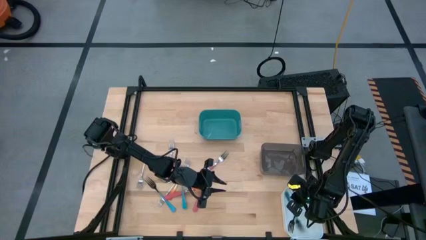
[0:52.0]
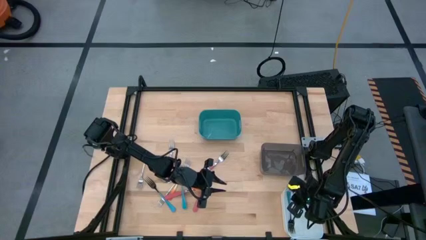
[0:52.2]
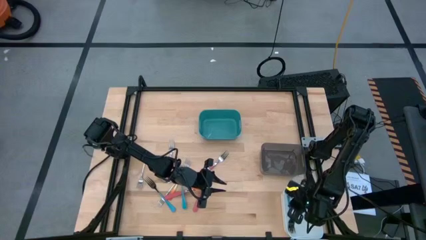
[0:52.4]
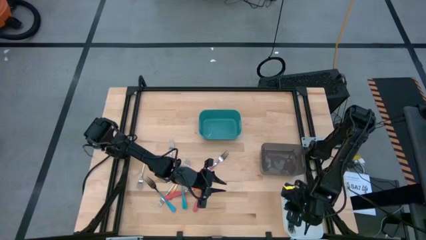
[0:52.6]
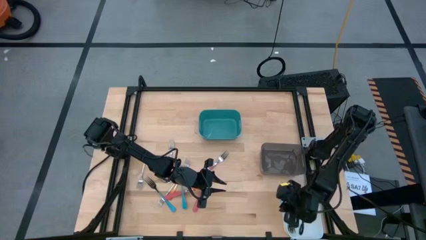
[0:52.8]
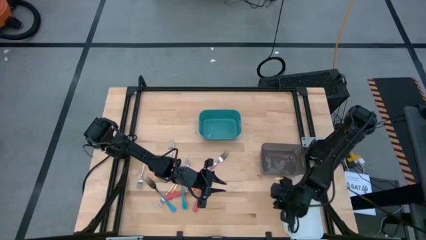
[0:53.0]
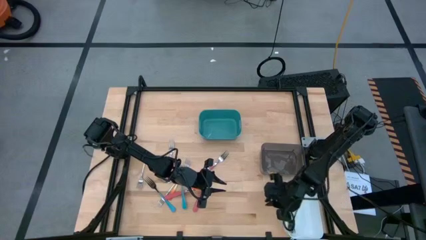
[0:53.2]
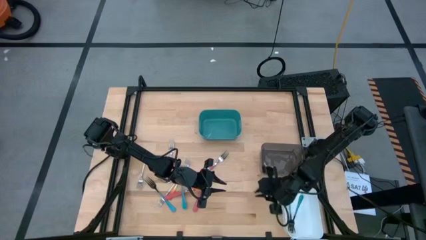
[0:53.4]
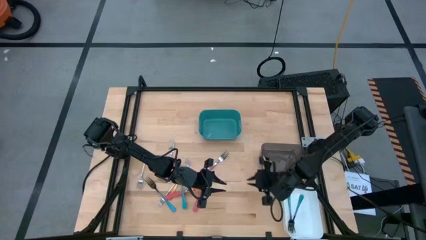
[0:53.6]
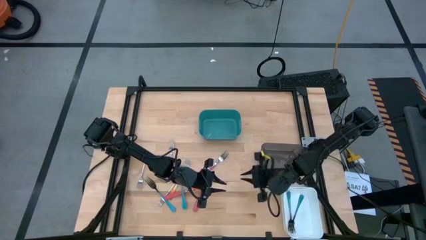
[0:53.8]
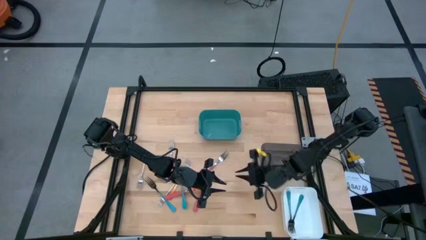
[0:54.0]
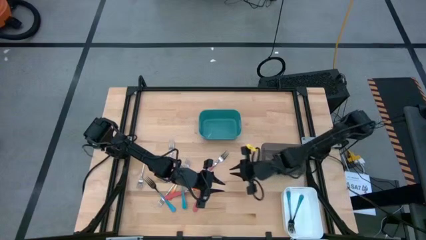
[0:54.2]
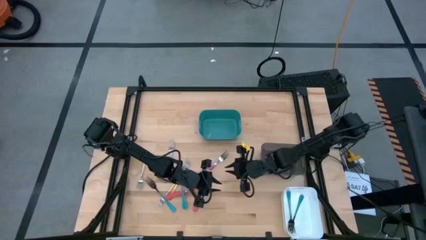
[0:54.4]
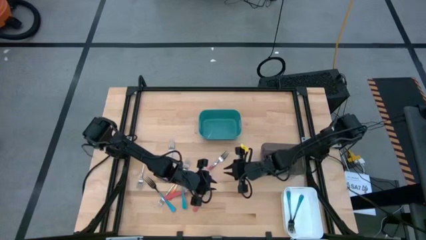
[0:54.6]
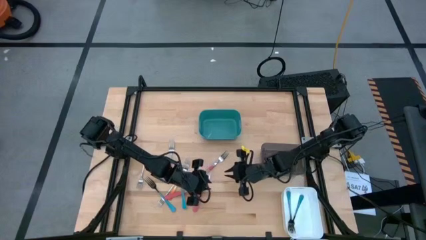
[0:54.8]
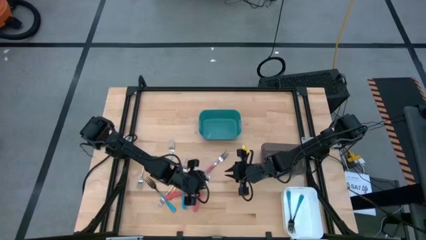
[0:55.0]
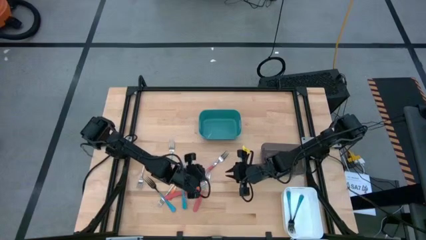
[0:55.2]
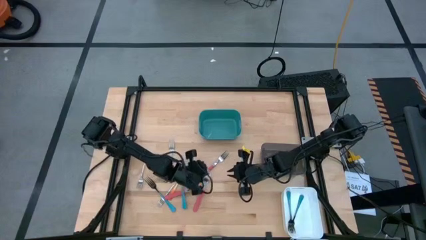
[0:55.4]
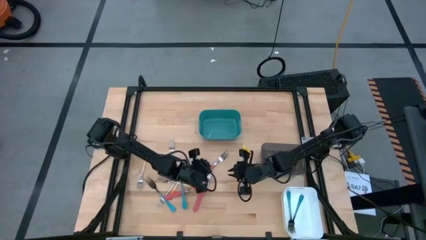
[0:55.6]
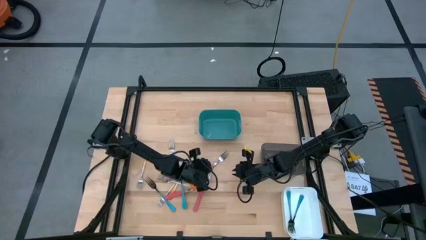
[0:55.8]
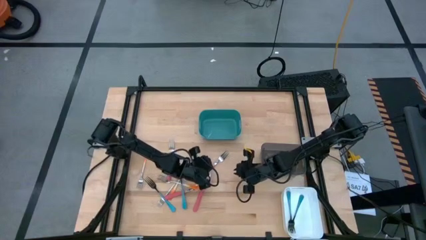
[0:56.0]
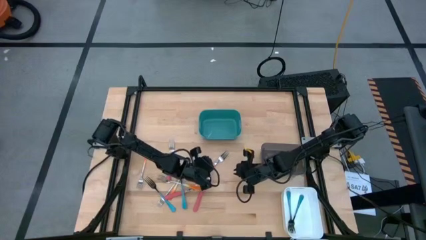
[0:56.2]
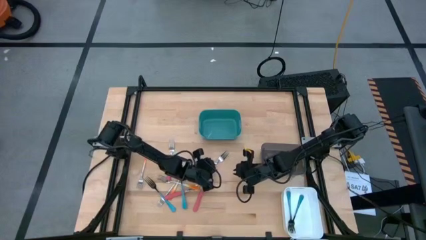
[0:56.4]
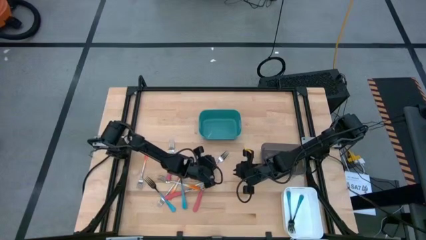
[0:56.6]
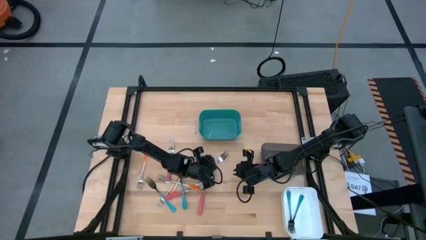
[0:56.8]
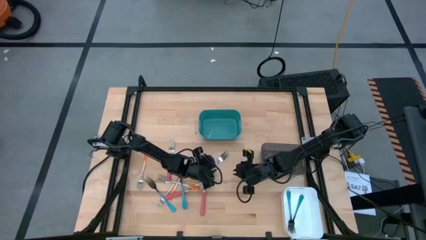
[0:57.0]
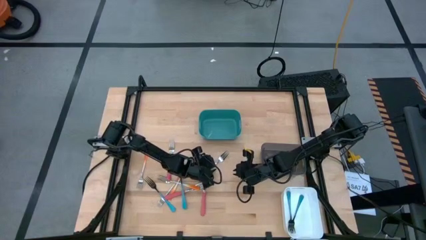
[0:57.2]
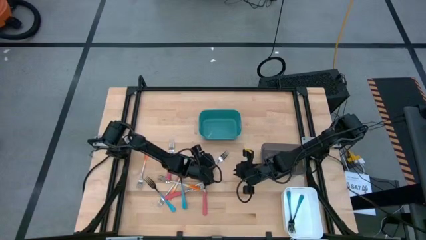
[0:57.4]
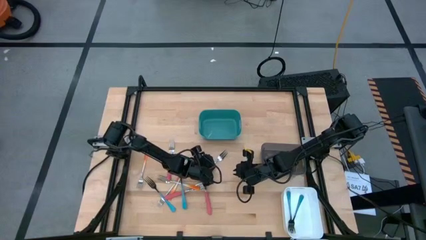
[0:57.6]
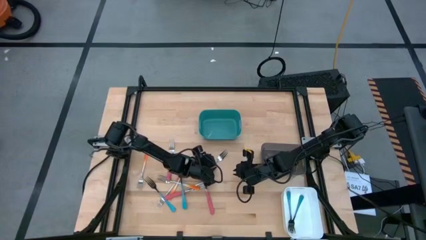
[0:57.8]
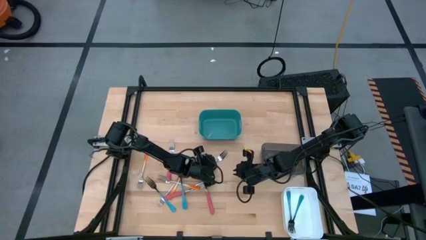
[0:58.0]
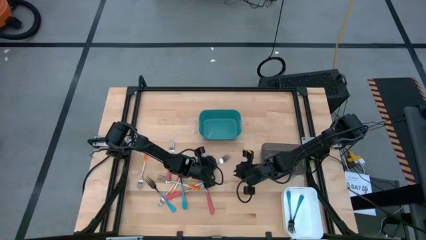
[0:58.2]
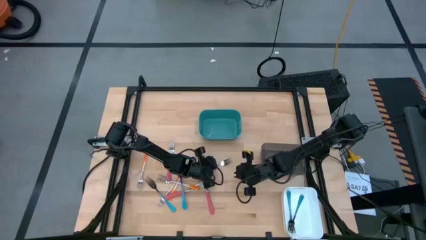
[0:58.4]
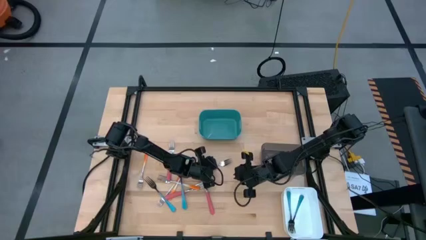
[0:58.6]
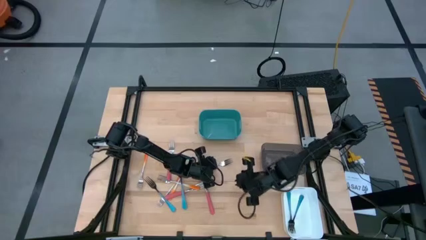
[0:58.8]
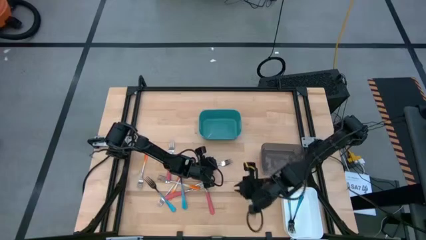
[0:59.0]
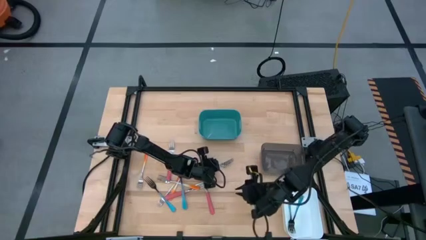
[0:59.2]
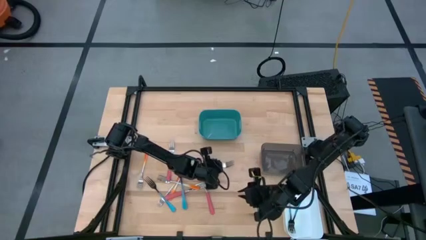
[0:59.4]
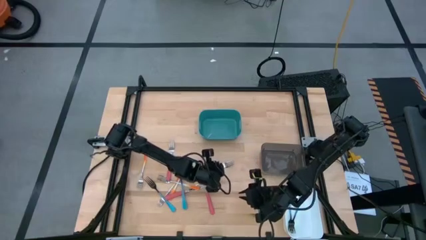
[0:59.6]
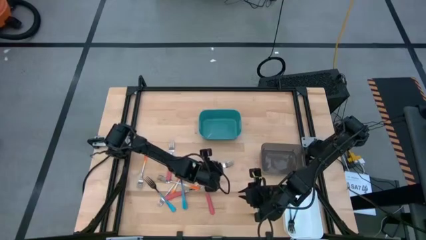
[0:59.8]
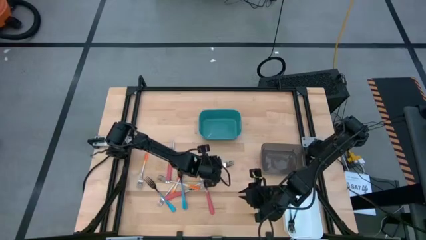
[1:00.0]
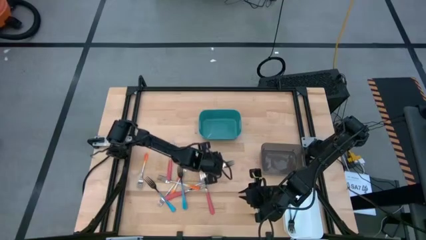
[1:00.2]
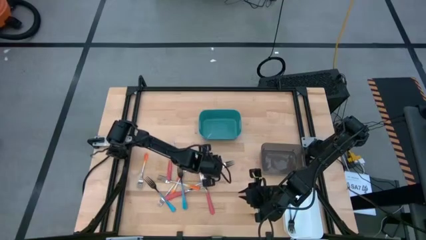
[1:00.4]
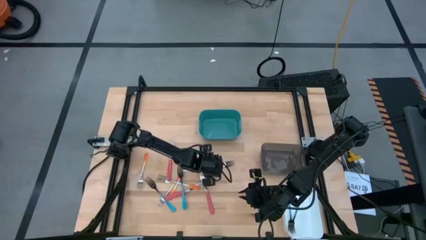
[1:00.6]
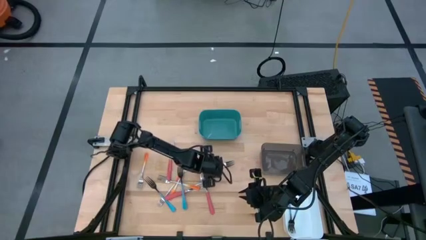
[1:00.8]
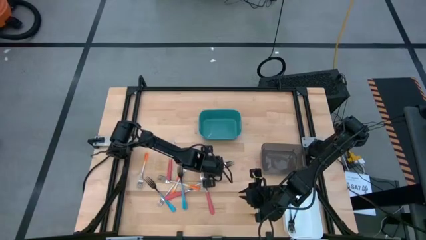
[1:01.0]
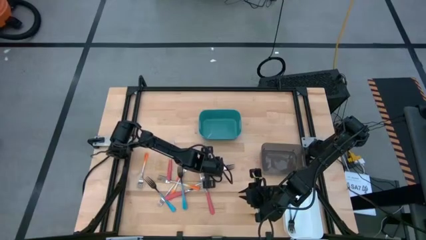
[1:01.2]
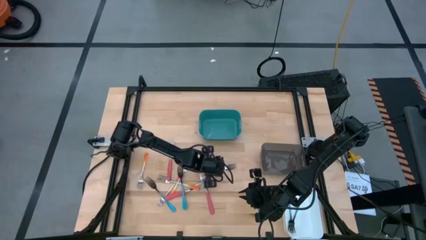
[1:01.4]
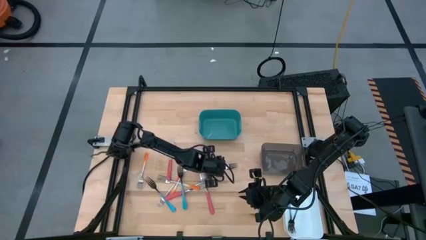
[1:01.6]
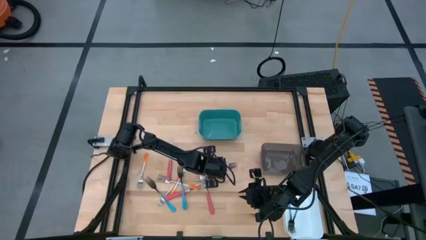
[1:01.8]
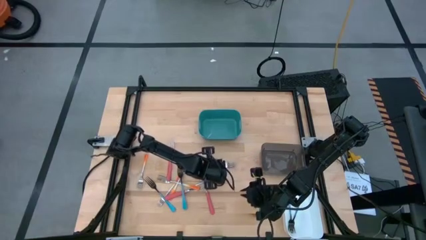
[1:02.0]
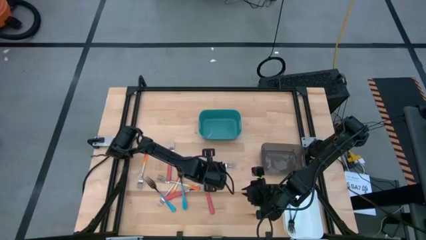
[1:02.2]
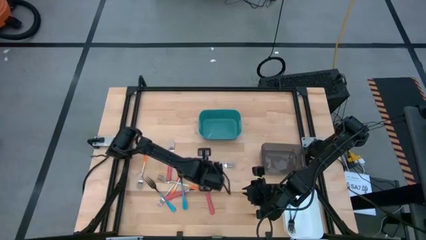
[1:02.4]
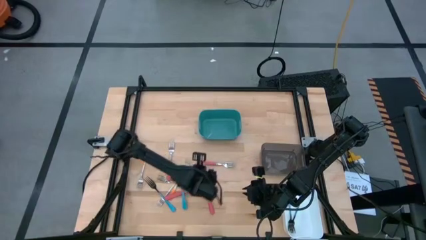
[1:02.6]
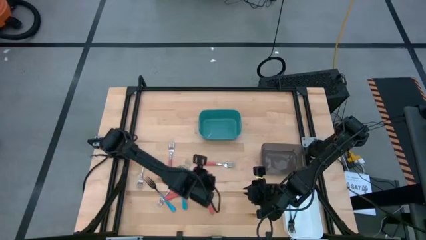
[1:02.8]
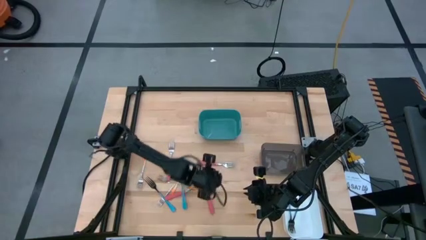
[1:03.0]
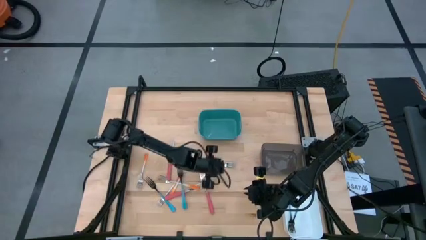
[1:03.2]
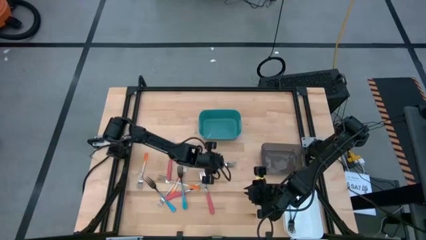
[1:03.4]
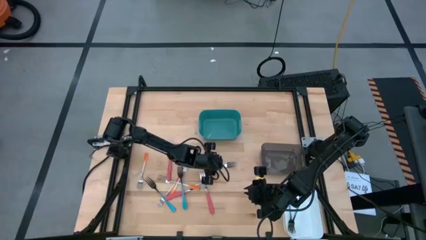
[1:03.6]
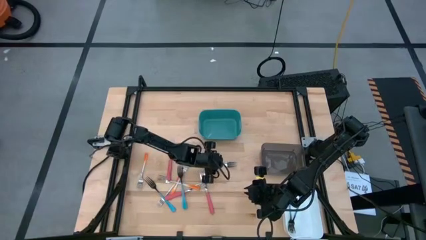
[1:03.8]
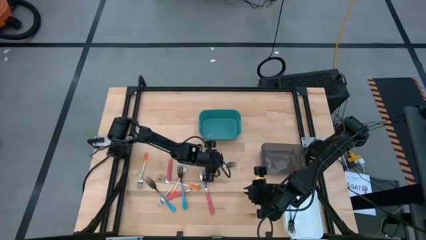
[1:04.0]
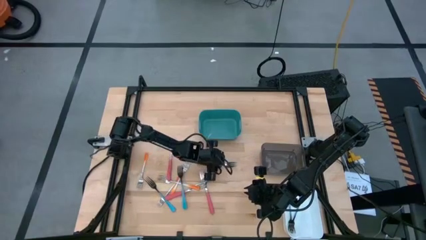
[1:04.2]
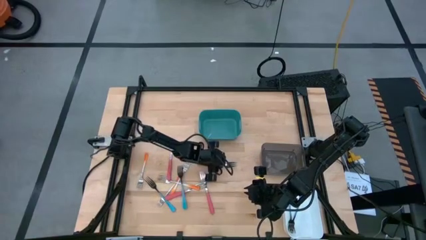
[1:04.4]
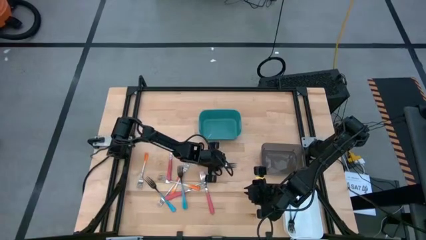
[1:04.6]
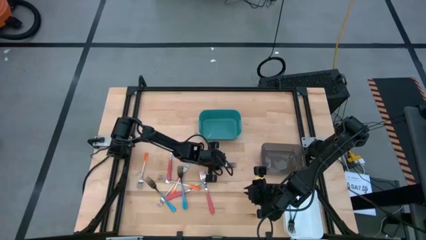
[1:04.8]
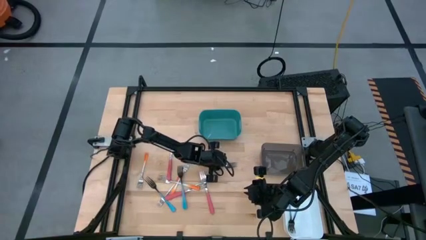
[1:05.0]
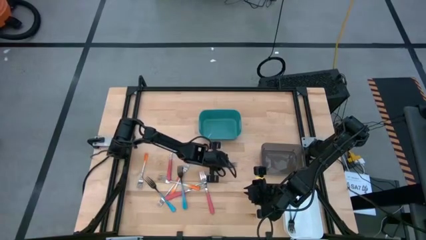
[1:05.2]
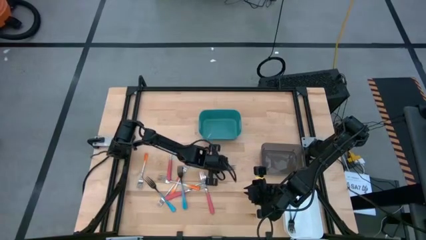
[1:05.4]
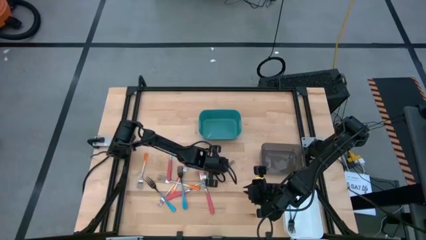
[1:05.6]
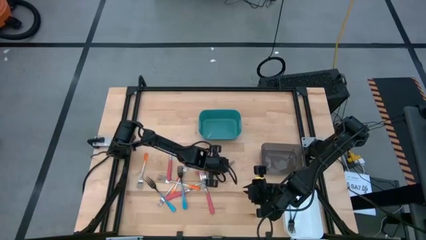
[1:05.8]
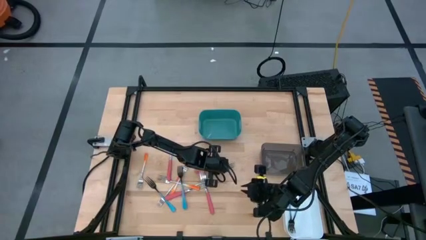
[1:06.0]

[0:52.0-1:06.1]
Task: Sort silverware by color (type)
Put the pink fork into the black bin
